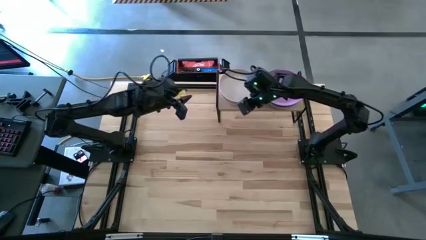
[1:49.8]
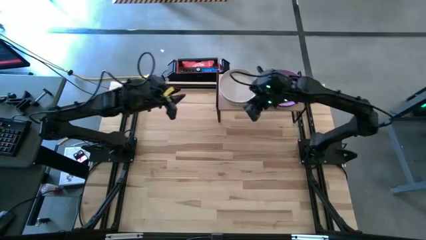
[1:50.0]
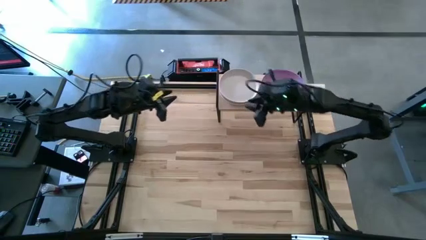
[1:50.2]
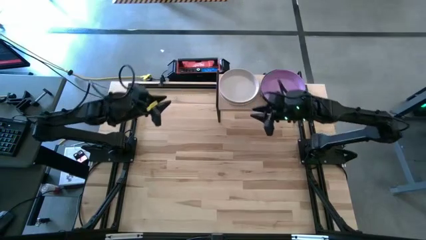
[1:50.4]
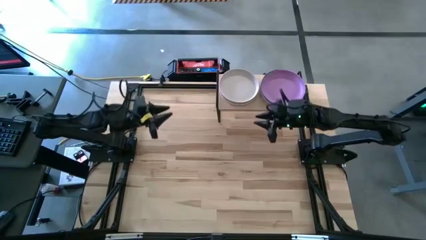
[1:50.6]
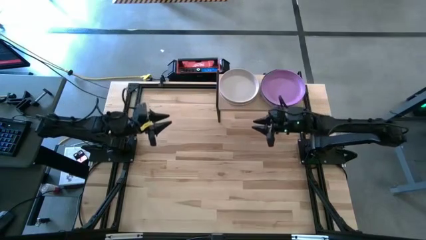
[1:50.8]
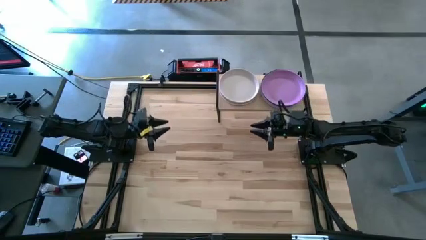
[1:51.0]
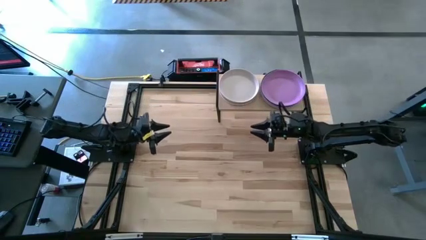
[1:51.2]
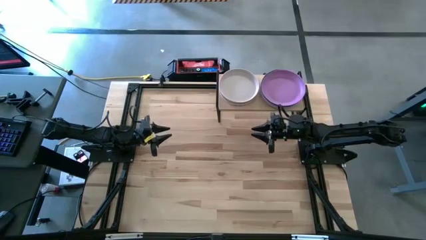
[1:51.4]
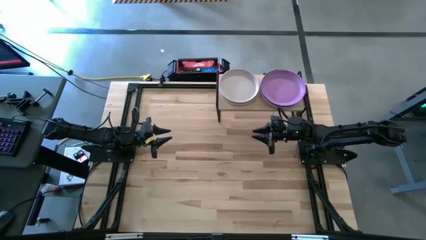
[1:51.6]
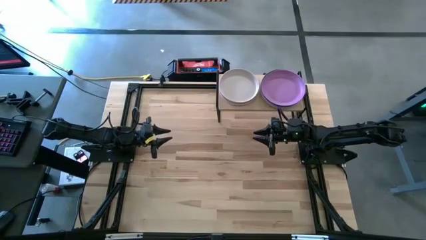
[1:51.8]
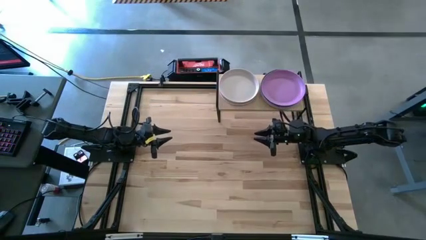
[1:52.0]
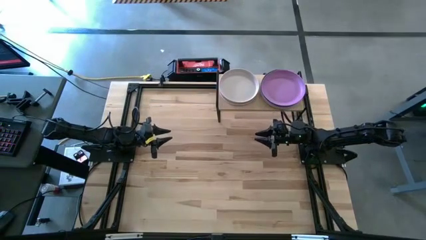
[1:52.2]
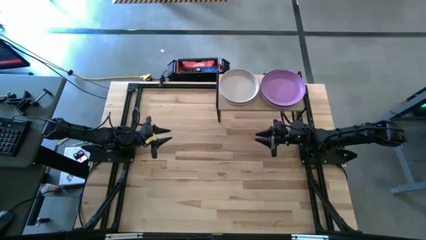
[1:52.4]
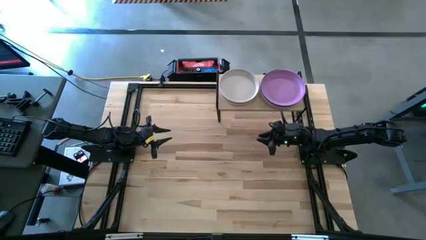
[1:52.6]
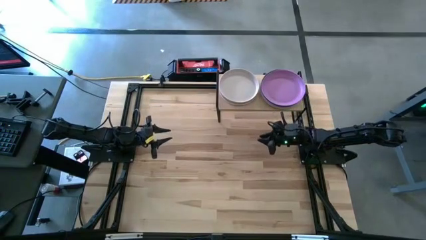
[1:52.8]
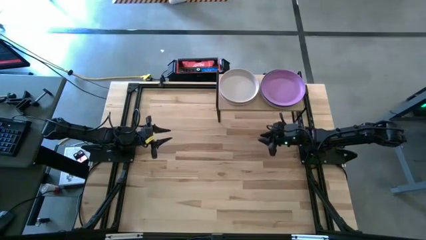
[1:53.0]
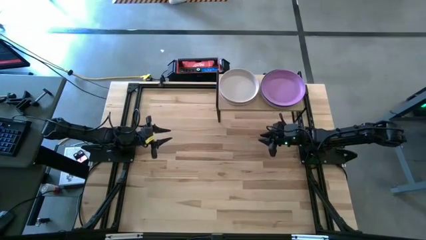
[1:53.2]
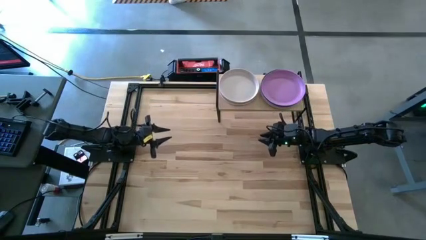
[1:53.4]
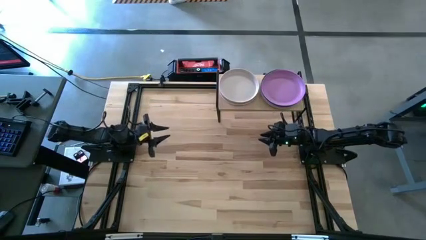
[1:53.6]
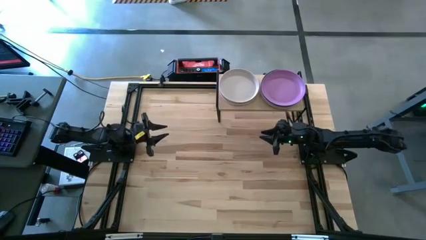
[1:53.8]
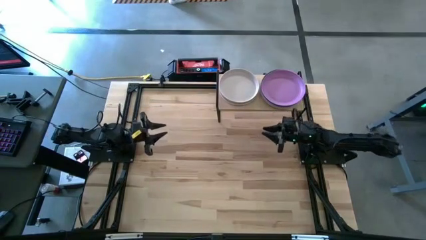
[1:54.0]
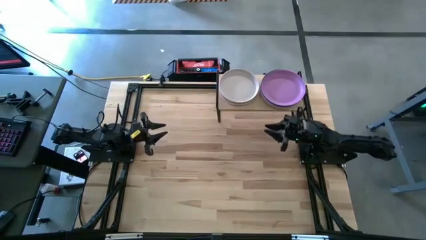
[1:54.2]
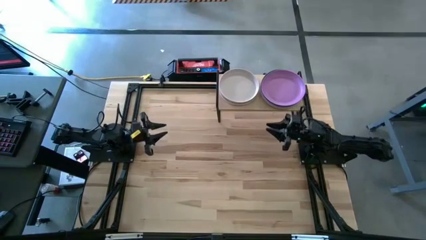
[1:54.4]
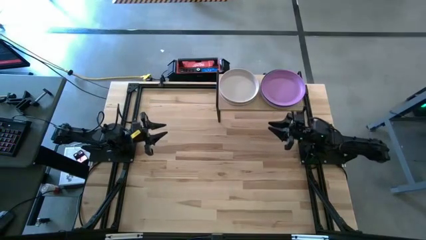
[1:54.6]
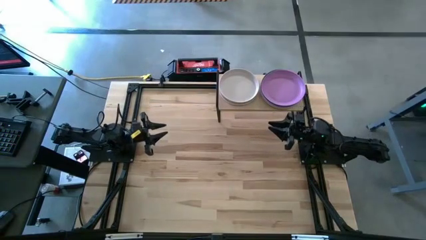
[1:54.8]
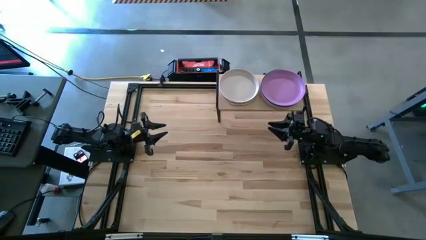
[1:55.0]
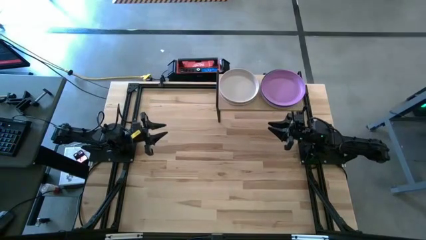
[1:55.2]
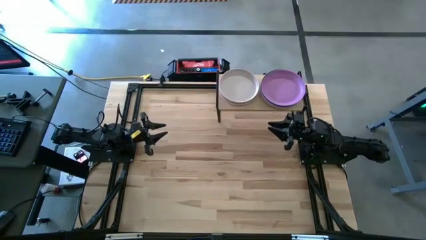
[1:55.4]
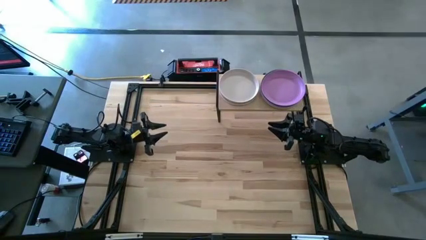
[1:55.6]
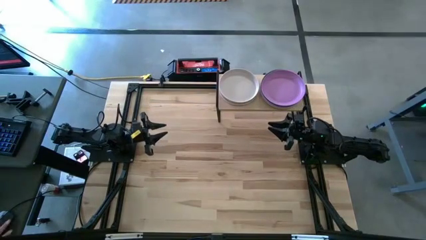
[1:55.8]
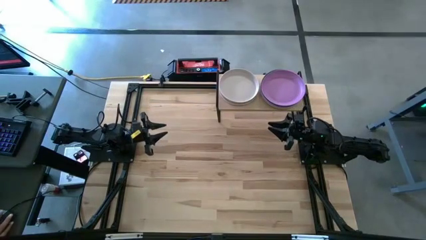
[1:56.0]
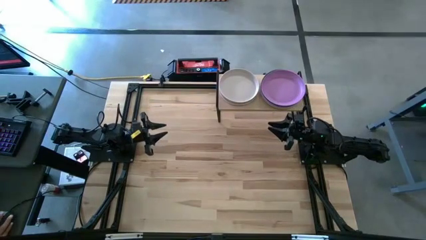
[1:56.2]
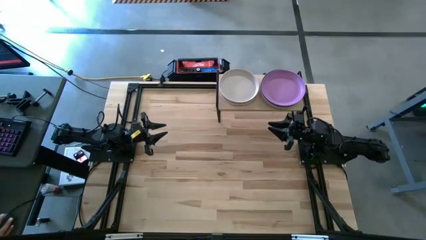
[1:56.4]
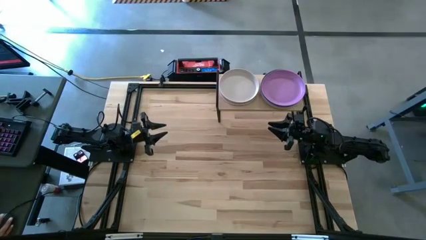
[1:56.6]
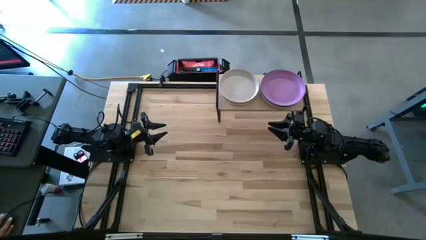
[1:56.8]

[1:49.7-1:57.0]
Task: Place and stack plates onto a shelf
Return to home position

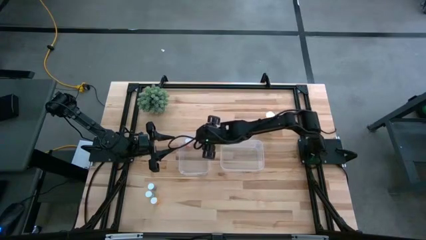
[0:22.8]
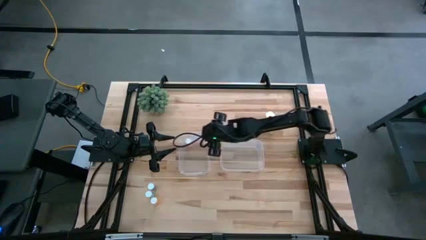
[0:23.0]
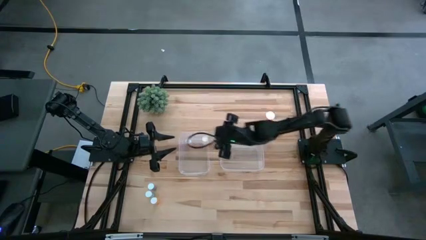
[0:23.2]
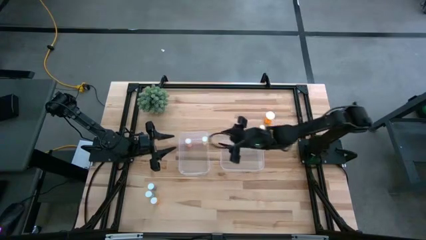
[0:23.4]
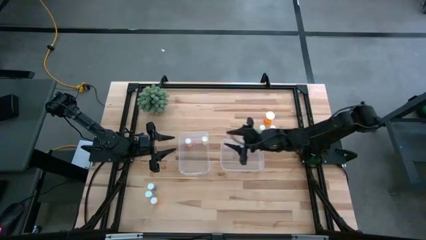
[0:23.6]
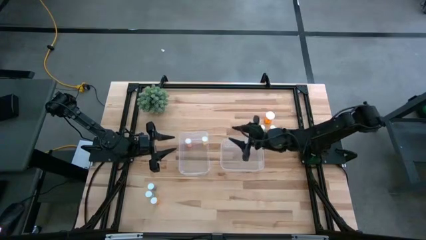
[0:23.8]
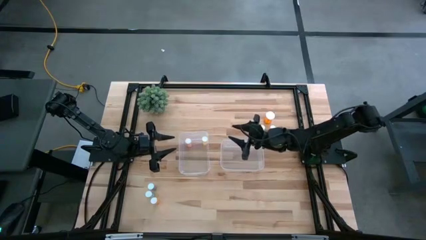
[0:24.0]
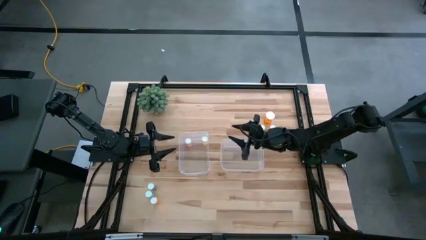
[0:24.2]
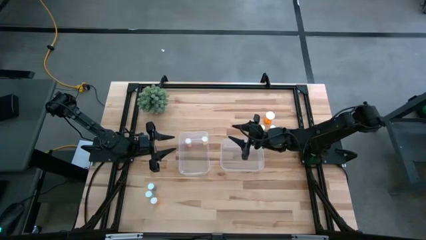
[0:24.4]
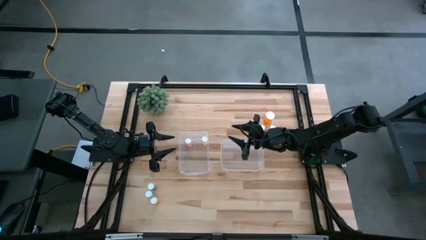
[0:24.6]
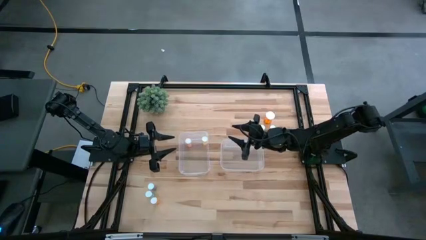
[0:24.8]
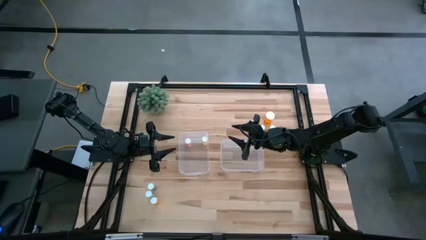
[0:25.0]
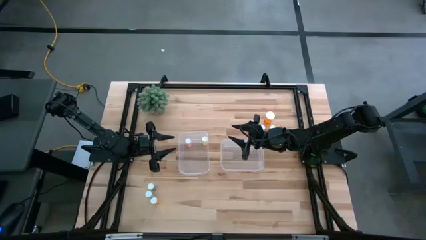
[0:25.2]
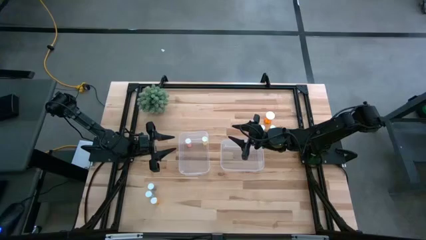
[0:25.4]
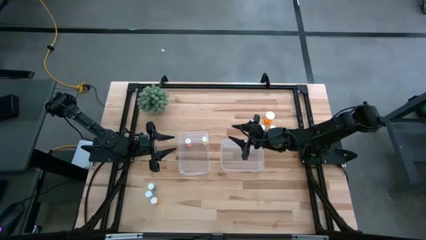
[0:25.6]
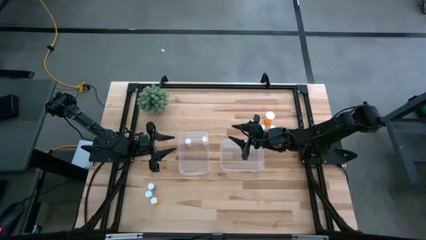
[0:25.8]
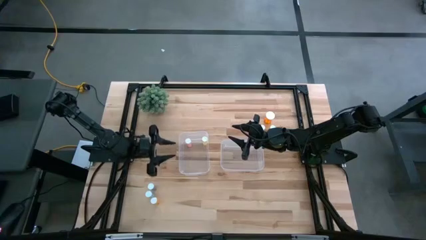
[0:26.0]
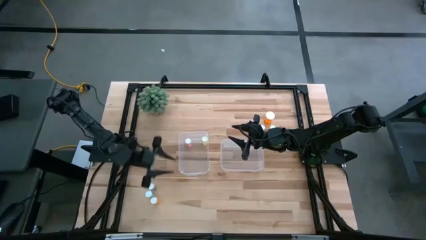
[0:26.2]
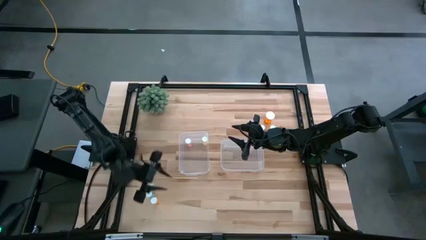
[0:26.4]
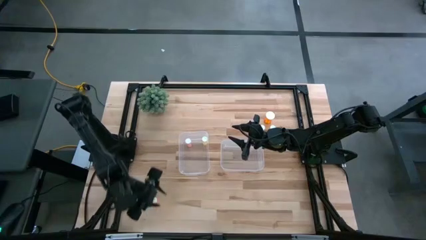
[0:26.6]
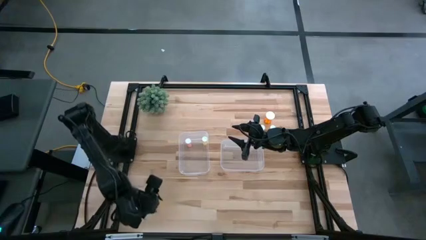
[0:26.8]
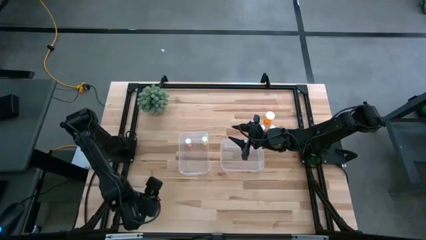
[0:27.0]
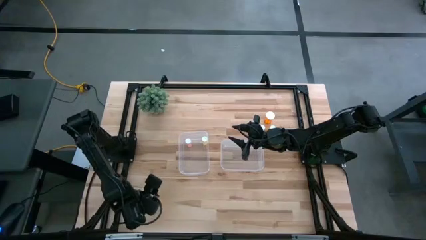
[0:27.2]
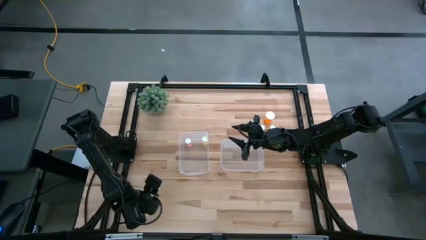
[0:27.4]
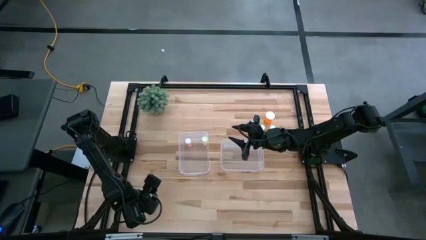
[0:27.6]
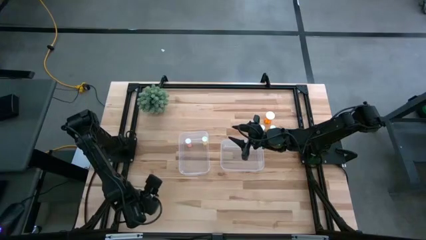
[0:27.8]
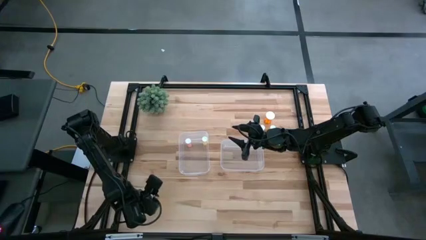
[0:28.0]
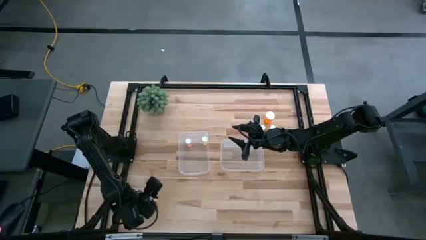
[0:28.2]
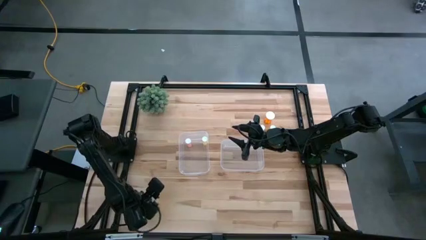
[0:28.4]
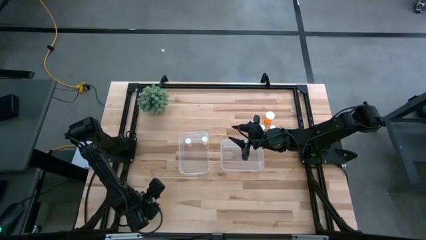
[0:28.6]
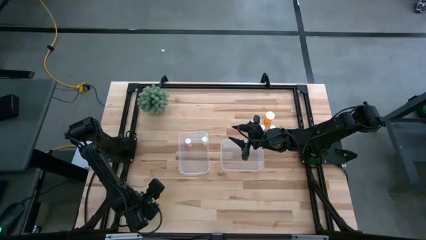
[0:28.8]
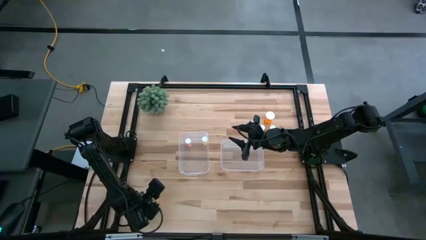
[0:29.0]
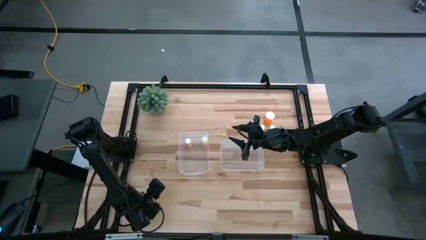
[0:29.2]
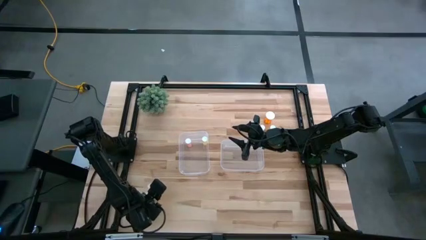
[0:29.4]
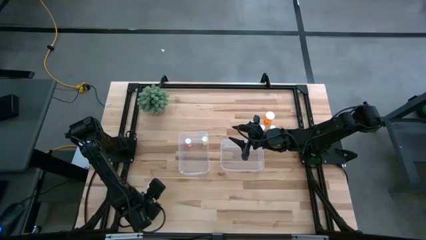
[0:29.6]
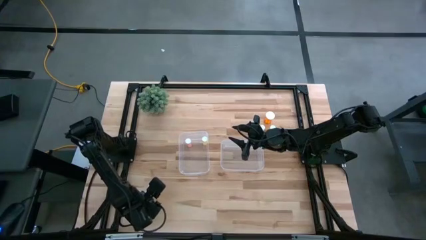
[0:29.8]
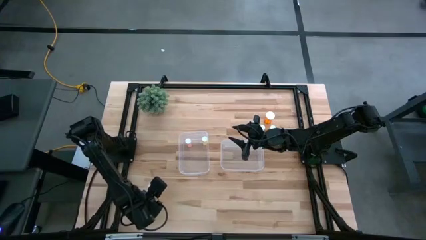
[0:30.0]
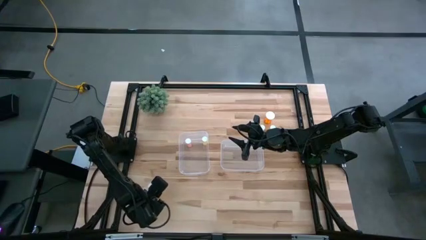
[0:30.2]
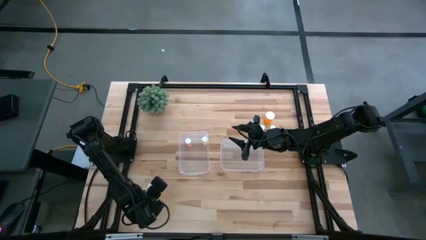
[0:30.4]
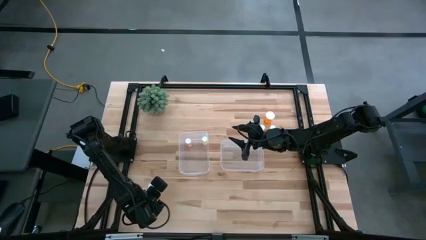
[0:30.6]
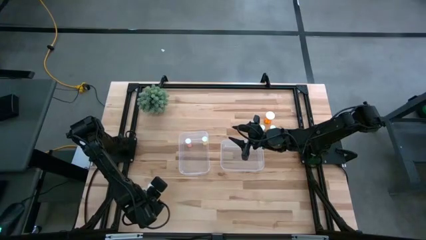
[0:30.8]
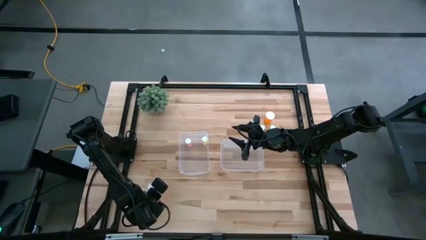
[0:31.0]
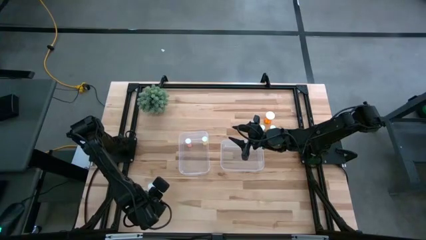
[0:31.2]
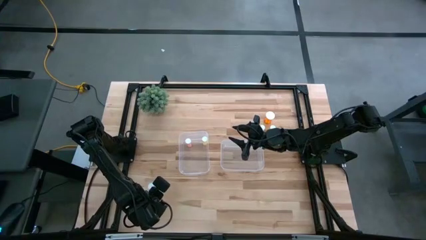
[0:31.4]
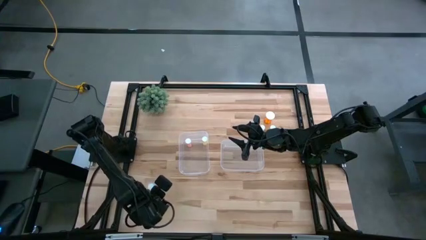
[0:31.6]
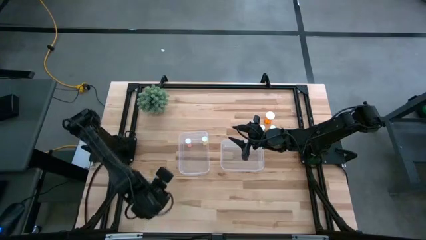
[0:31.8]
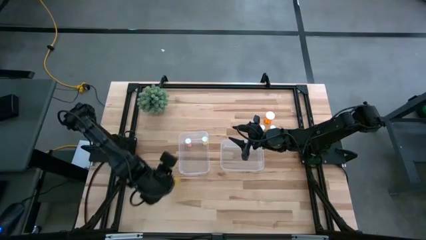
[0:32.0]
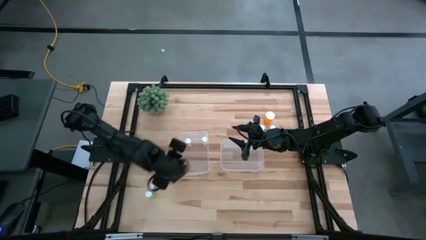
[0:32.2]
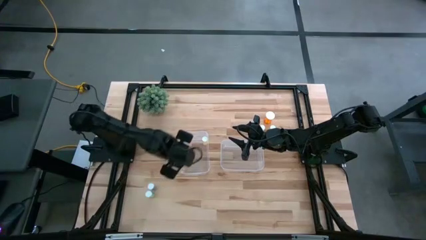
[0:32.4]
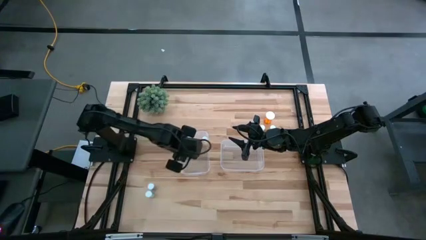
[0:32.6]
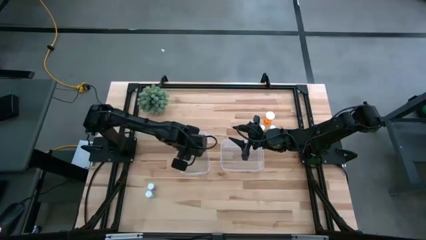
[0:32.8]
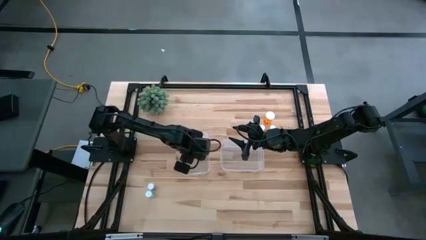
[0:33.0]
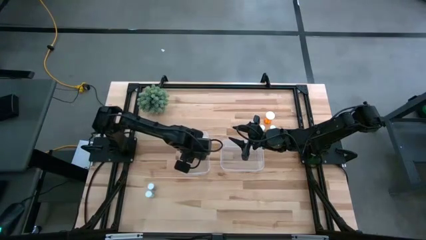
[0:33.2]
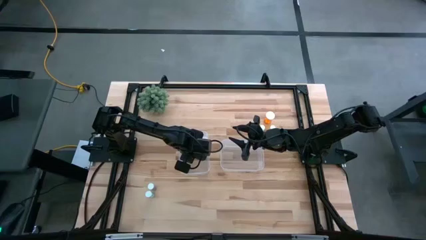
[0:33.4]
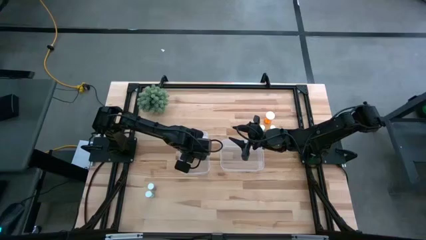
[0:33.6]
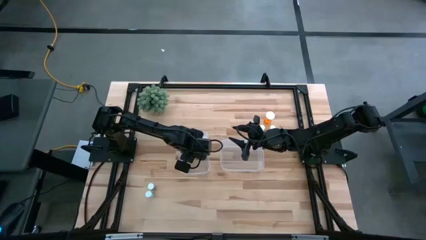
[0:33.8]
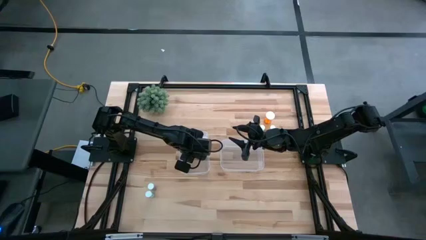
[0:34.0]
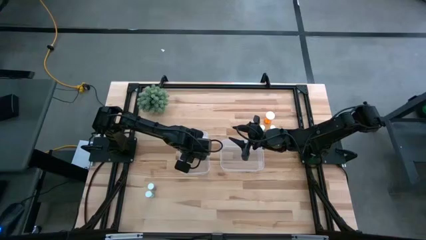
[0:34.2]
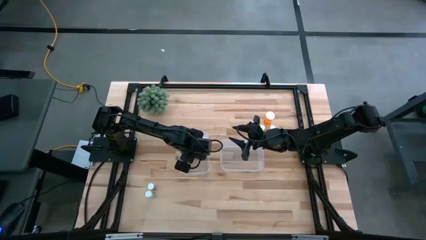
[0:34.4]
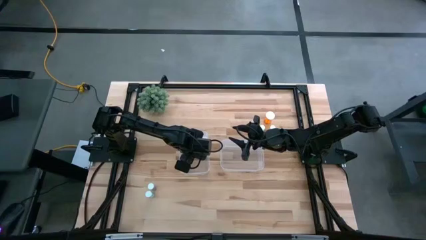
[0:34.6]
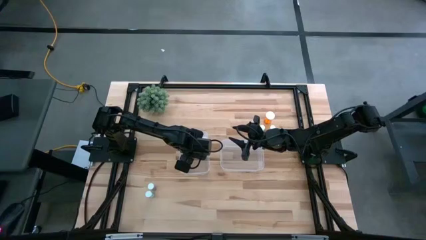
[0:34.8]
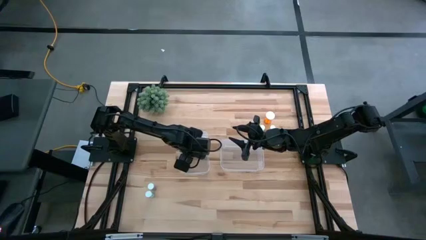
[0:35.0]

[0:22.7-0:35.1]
Task: Pick and place medicine bottles into bin by pill shape (circle, oval)
Put the orange tablet bottle into the left transparent bin
